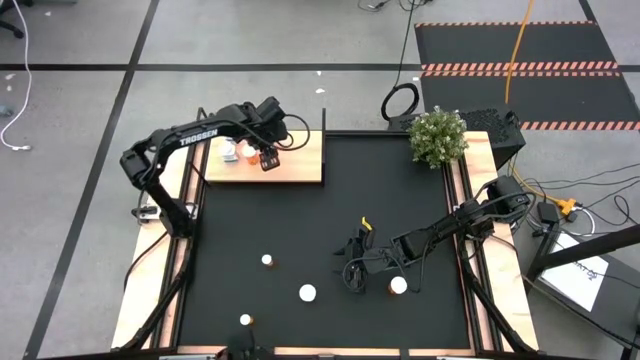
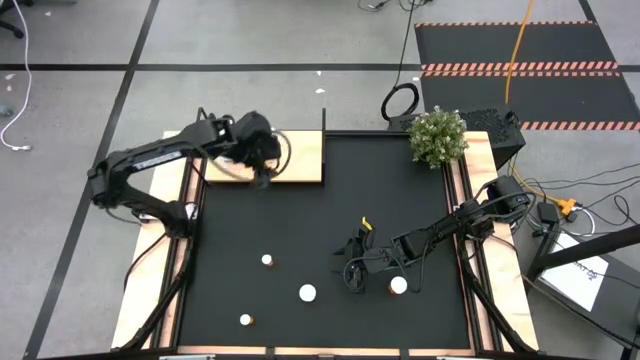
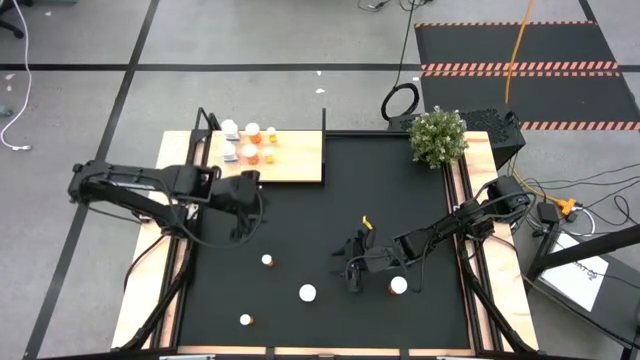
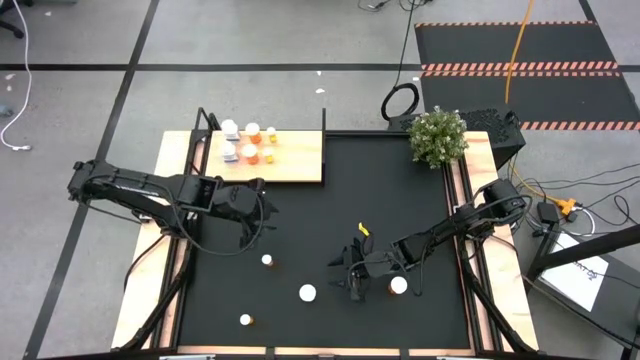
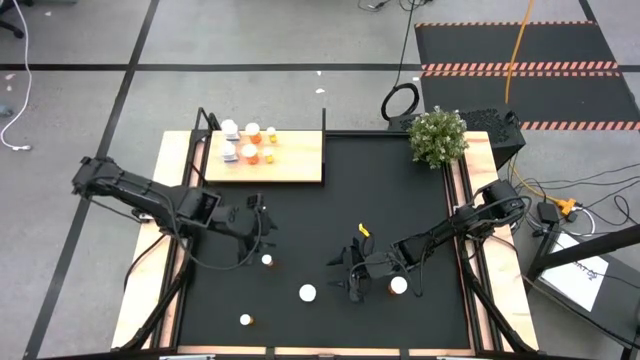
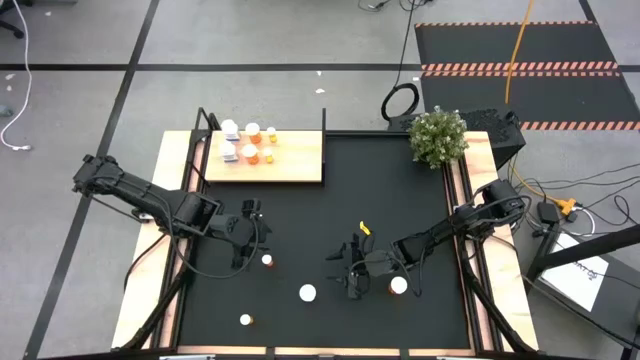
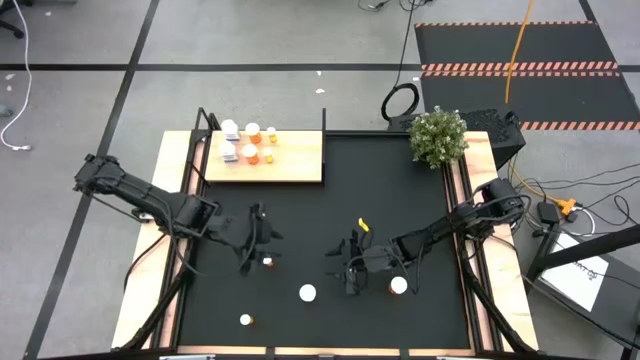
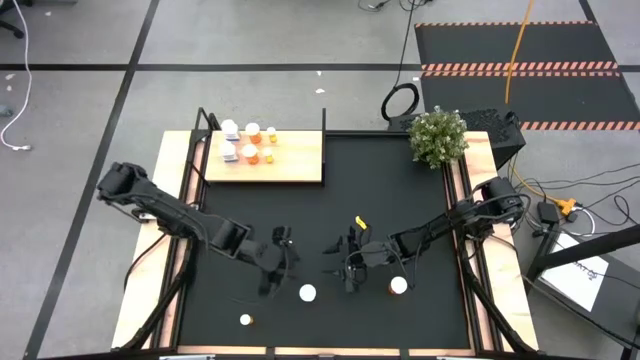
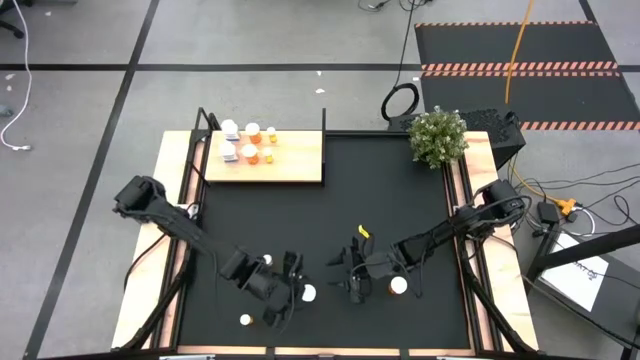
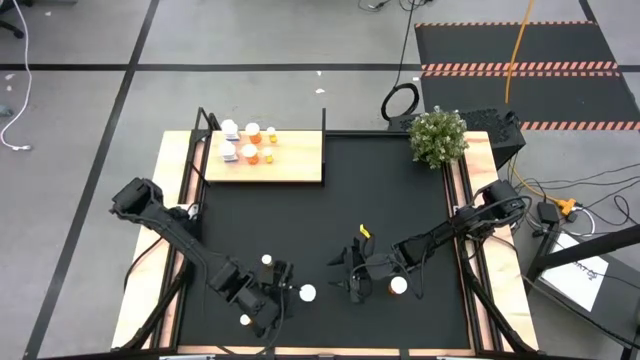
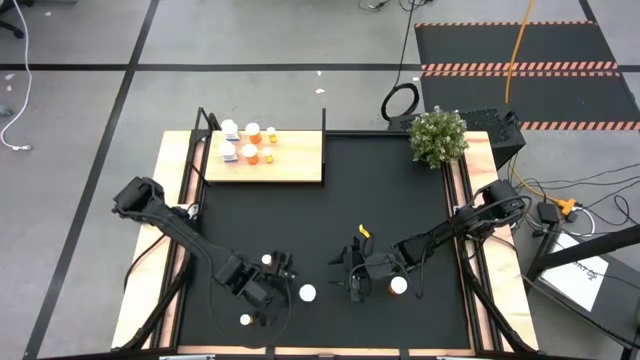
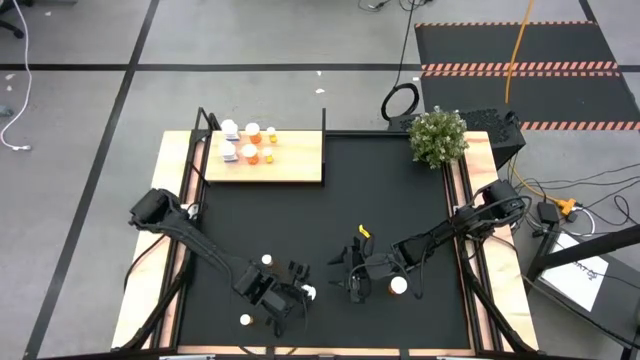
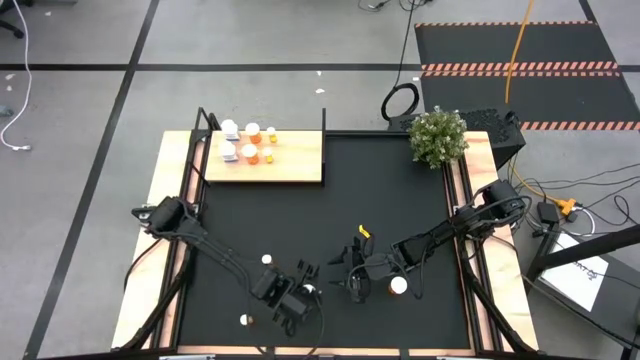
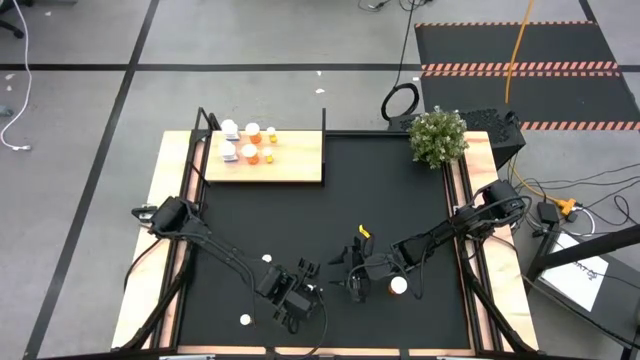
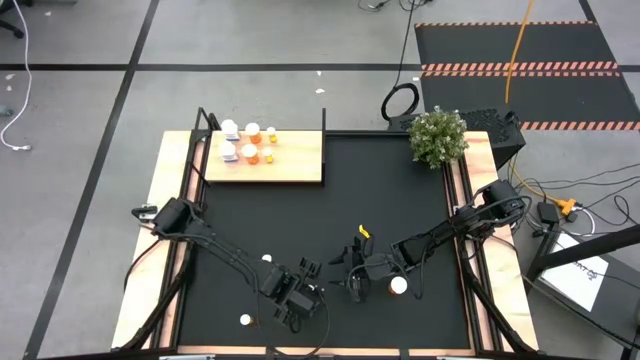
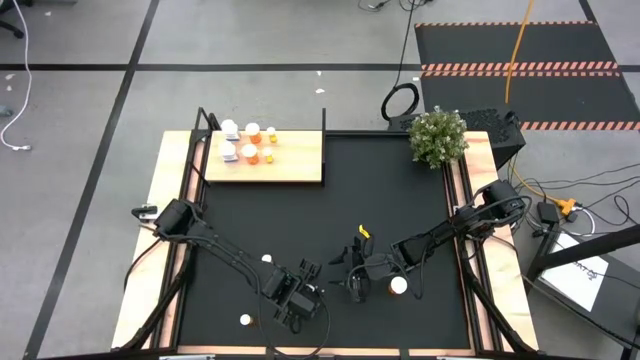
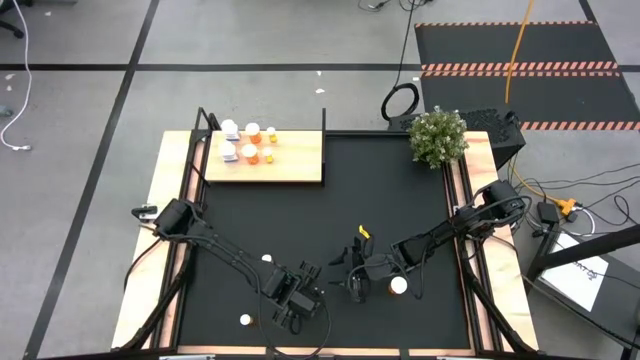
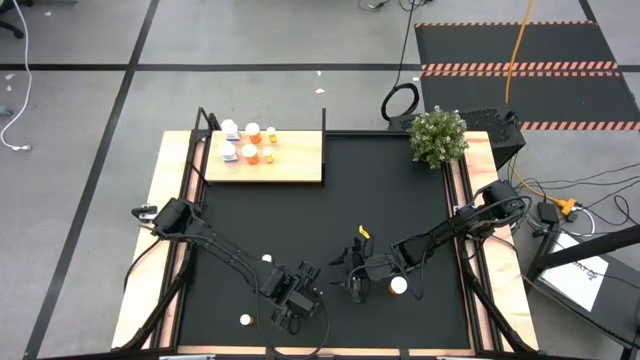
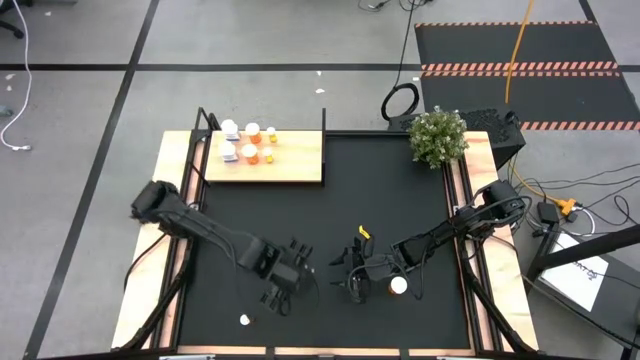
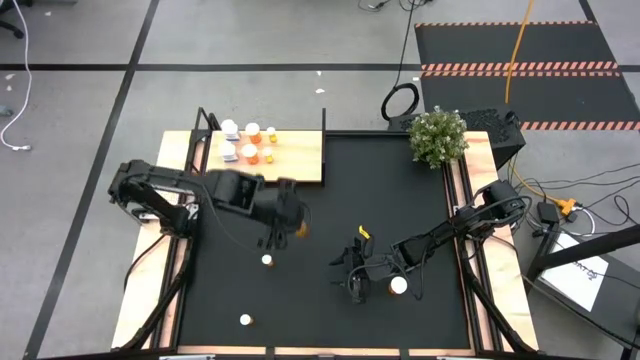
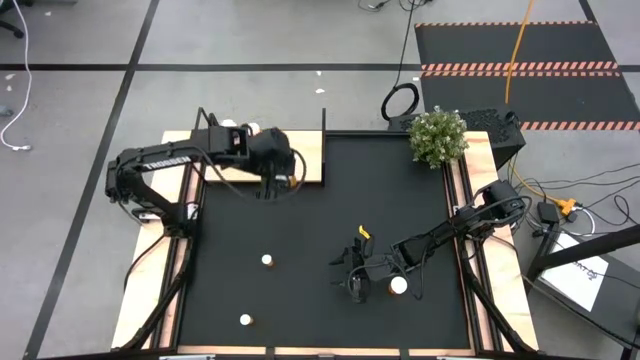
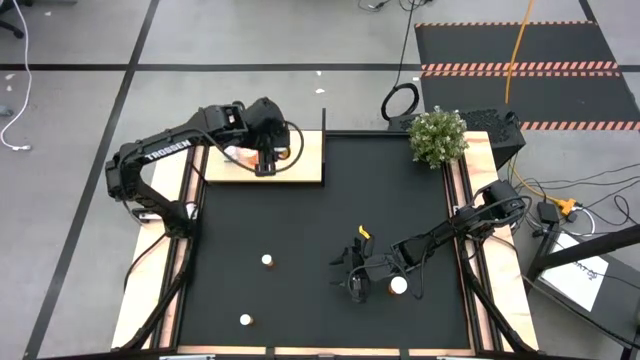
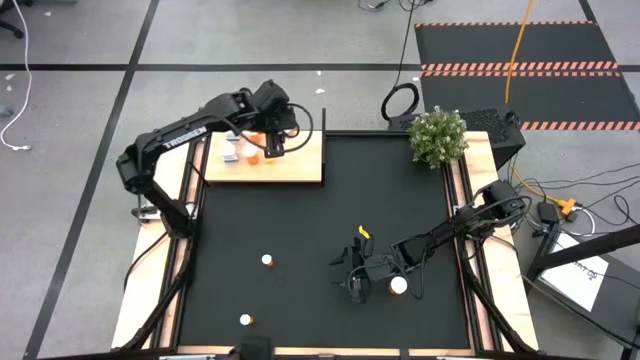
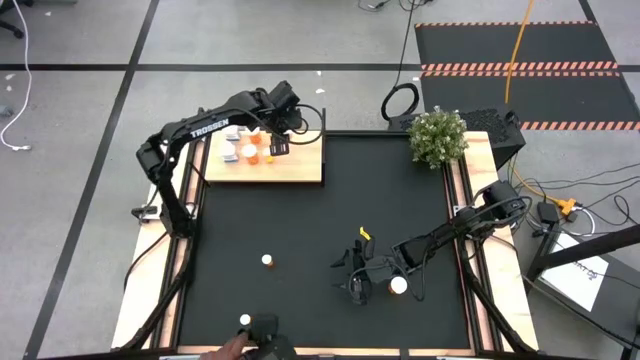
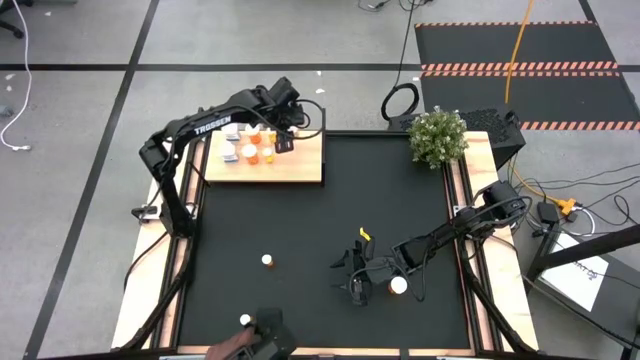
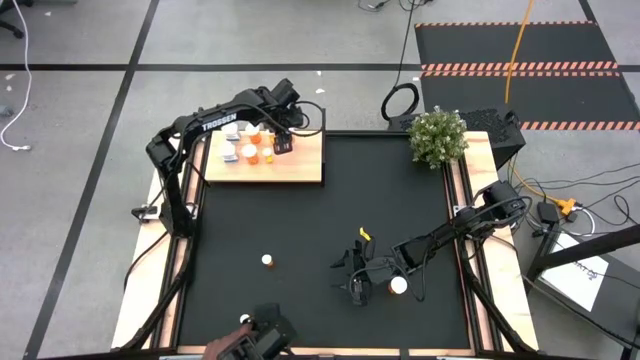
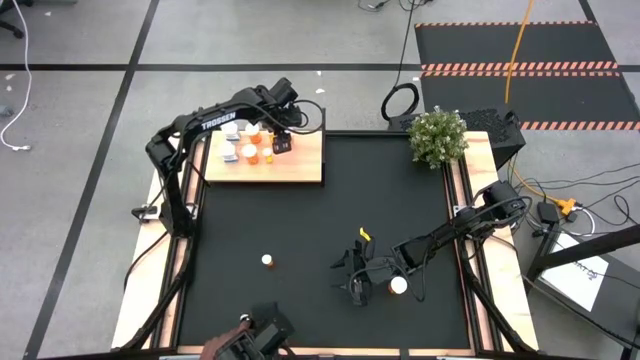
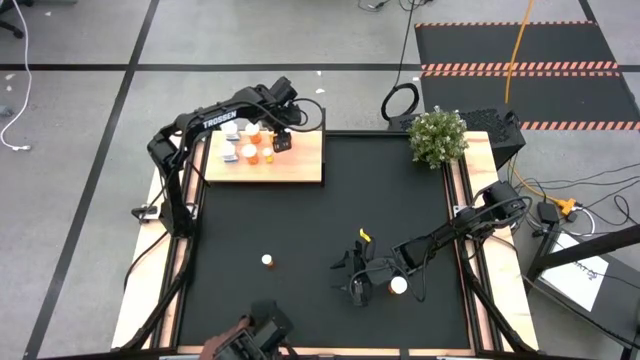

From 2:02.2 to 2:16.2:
Task: Pick and place medicine bottles onto shelf by color
Put the large orange pill bottle on the shelf

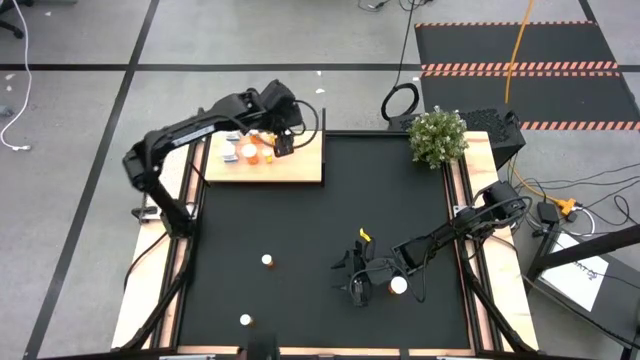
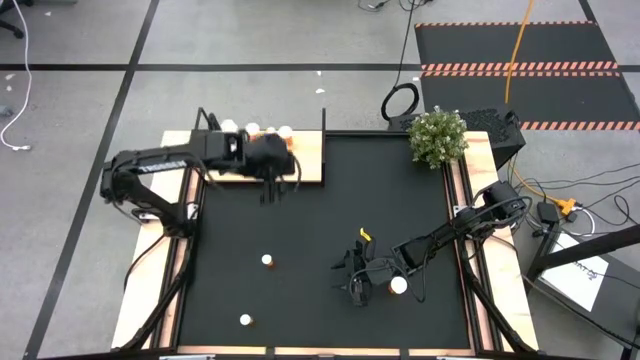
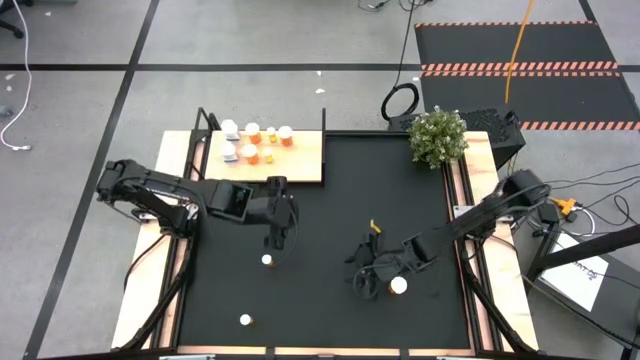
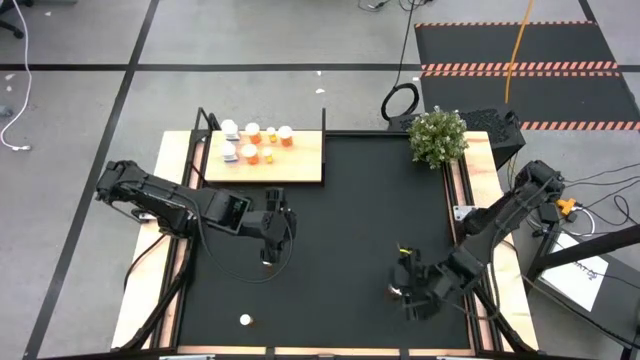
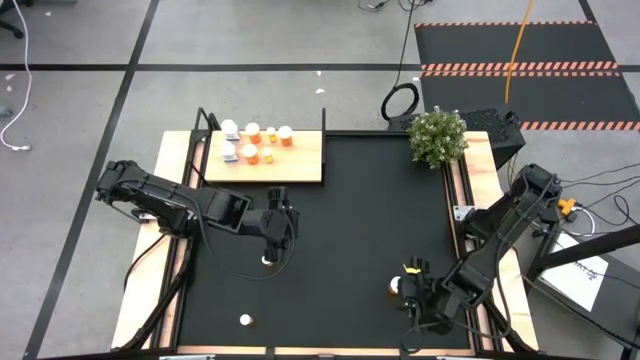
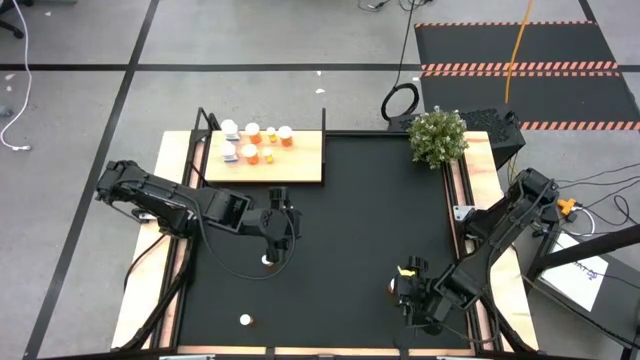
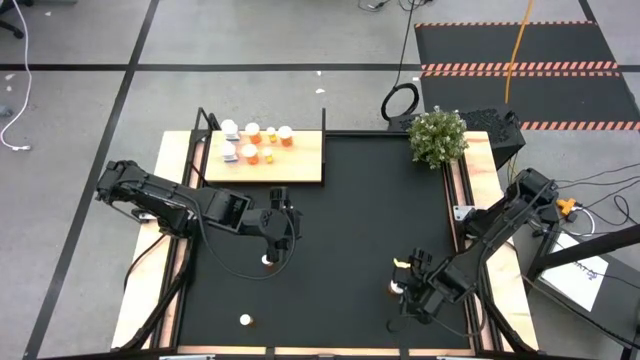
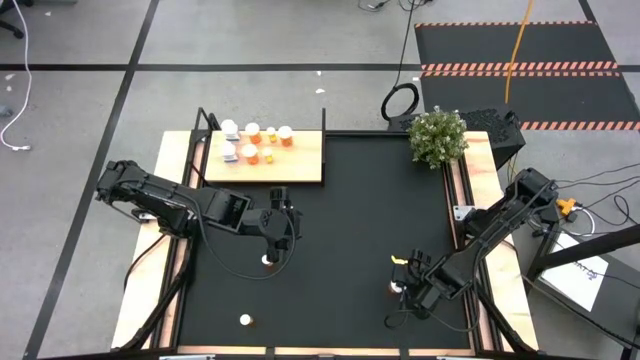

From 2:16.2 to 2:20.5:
Put the large orange pill bottle on the shelf aligned with the other large orange pill bottle on the shelf

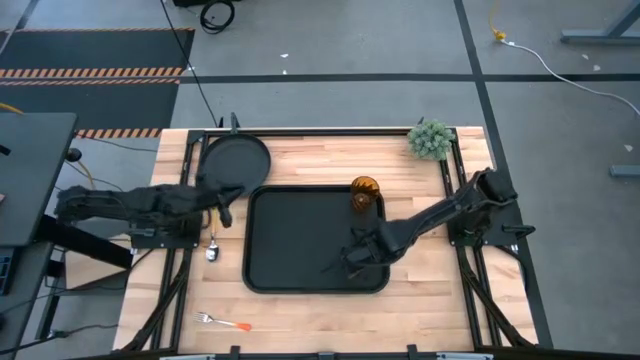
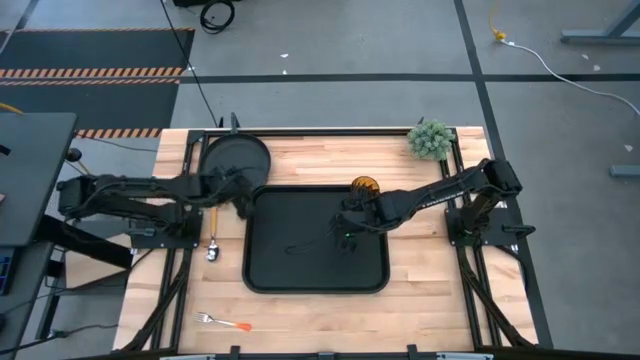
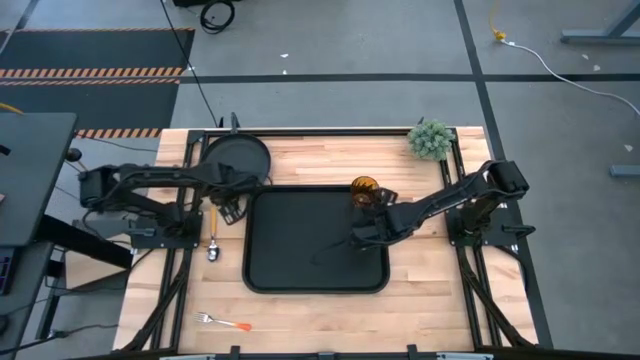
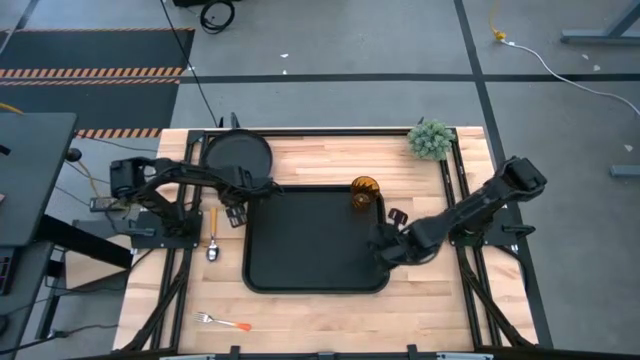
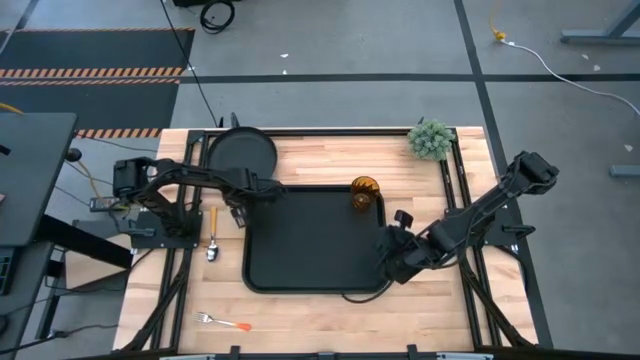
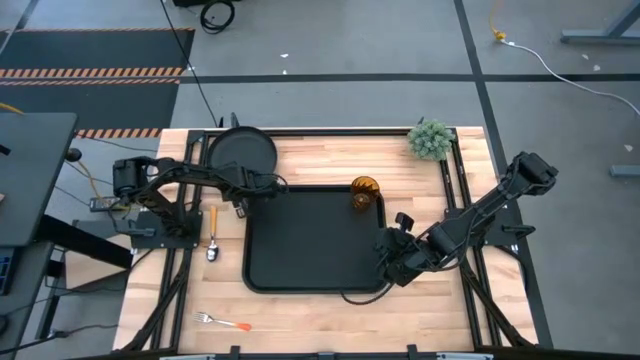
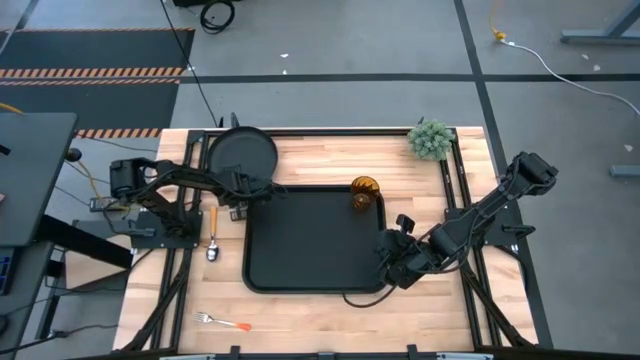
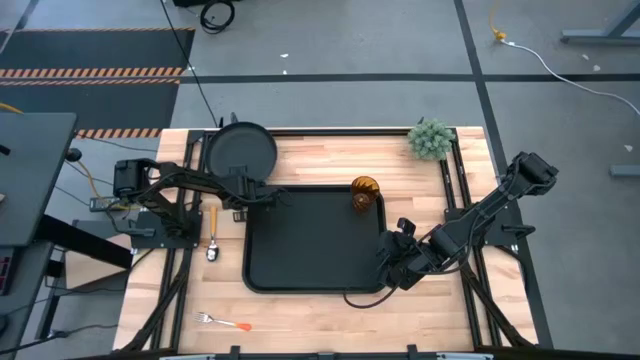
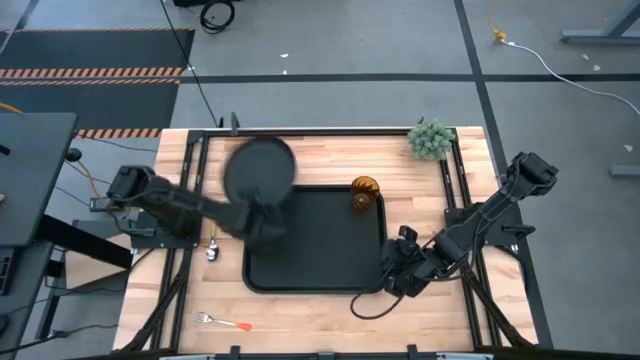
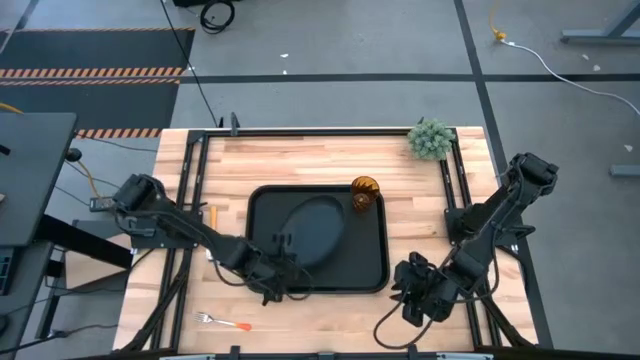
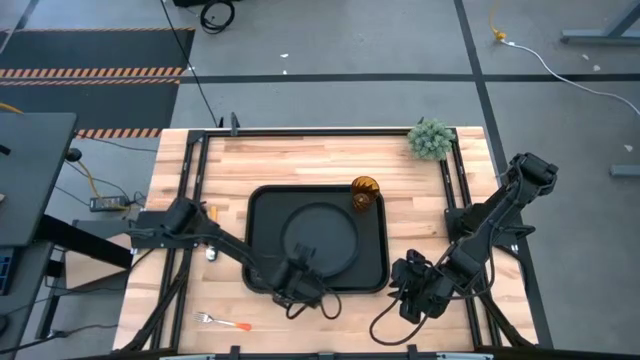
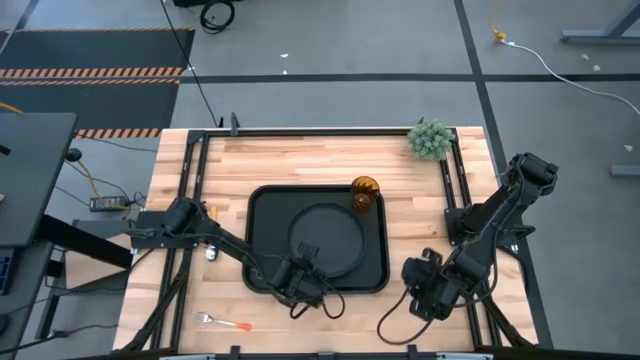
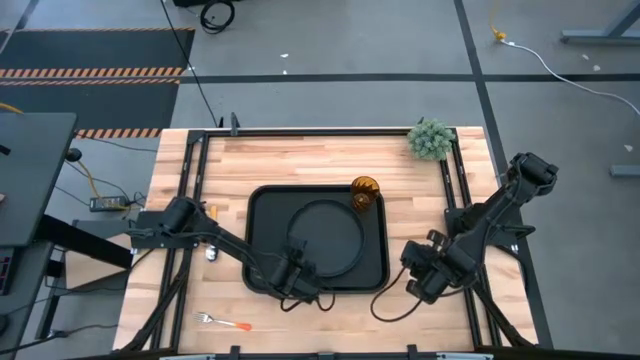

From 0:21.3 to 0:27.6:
Task: Pick and place plate/cup/fork/spoon on tray
Put the black plate on the black serving tray
